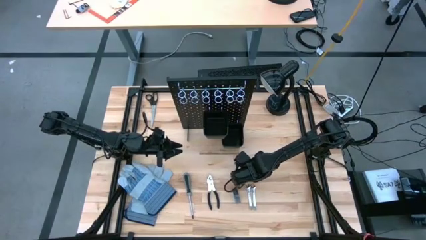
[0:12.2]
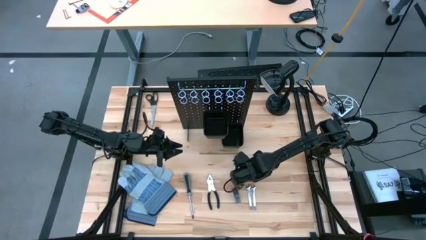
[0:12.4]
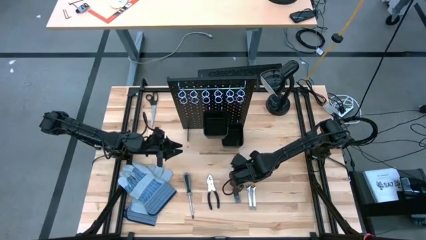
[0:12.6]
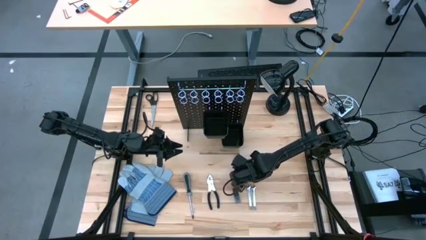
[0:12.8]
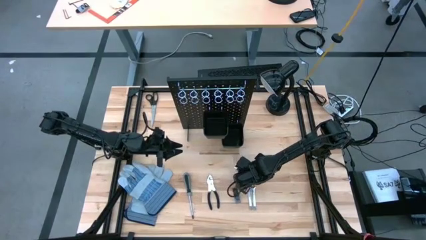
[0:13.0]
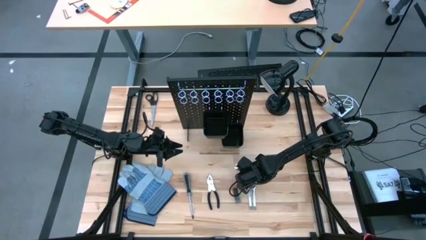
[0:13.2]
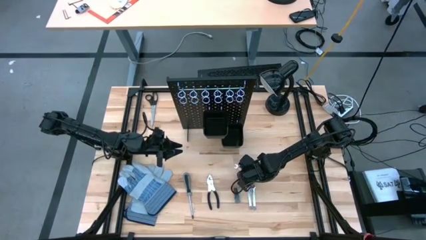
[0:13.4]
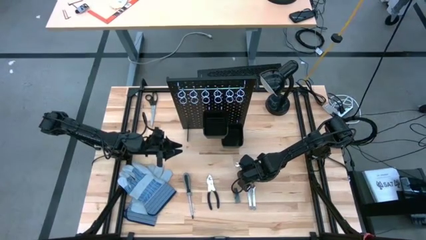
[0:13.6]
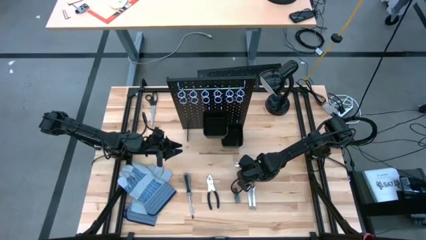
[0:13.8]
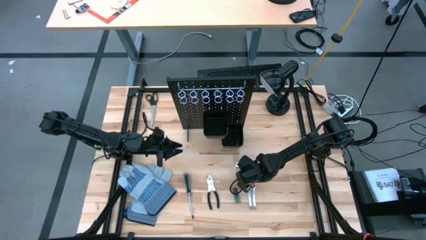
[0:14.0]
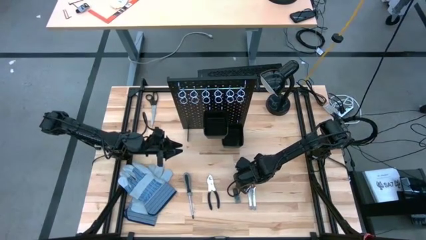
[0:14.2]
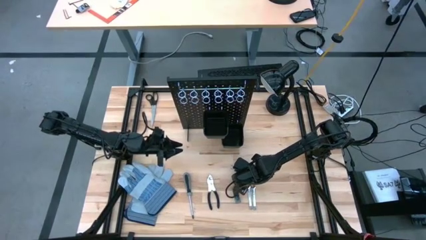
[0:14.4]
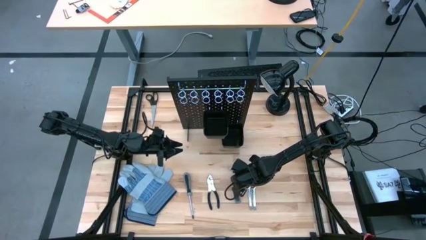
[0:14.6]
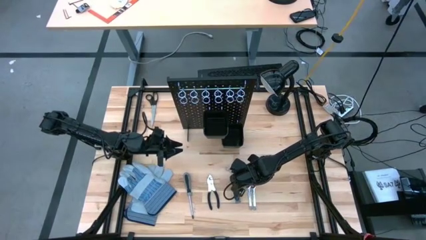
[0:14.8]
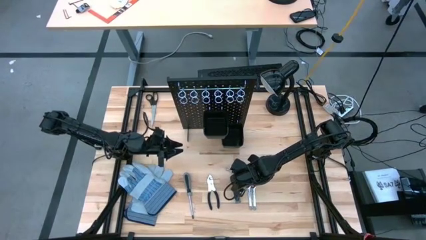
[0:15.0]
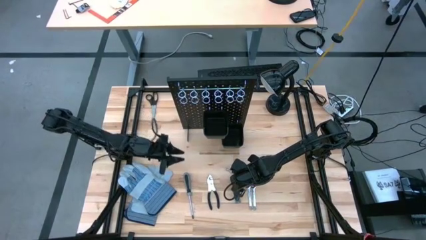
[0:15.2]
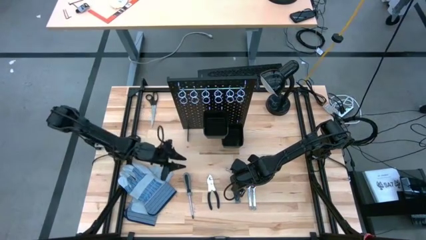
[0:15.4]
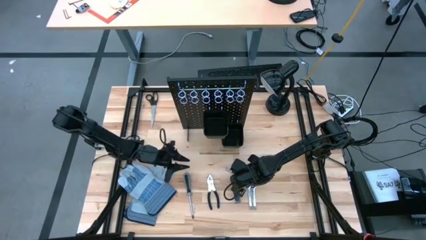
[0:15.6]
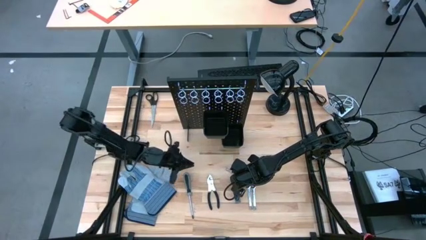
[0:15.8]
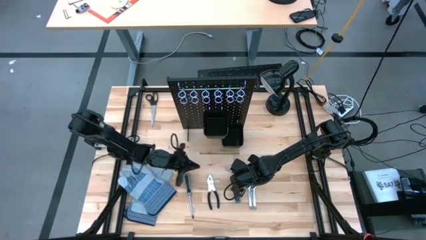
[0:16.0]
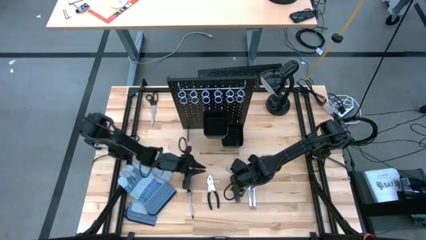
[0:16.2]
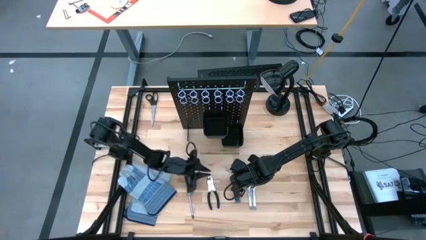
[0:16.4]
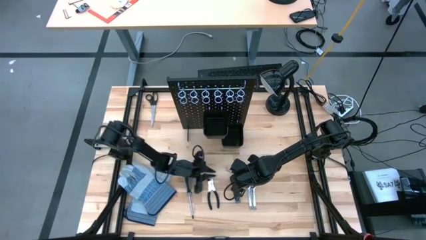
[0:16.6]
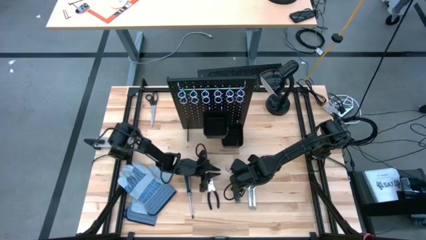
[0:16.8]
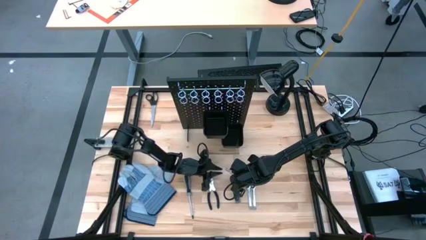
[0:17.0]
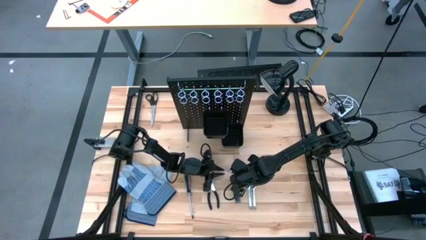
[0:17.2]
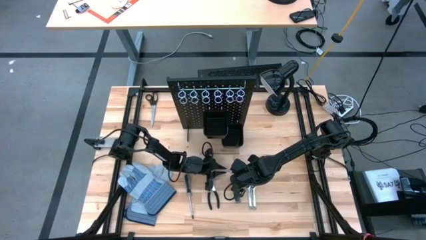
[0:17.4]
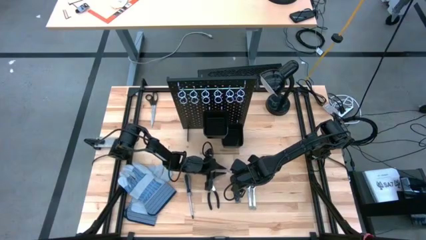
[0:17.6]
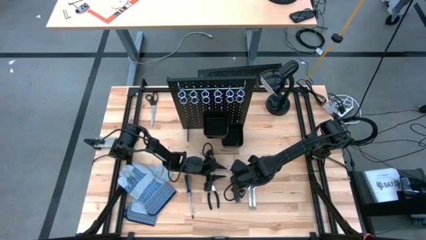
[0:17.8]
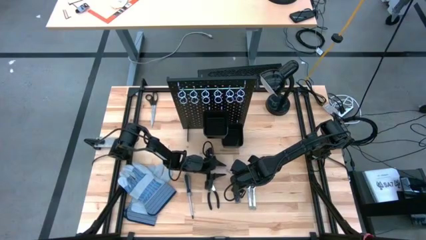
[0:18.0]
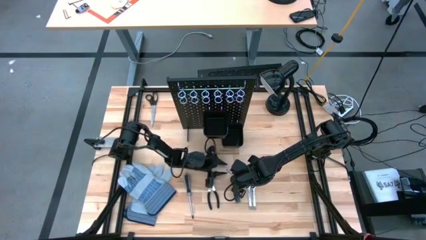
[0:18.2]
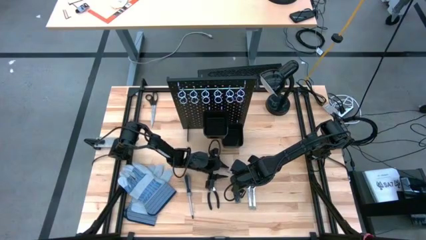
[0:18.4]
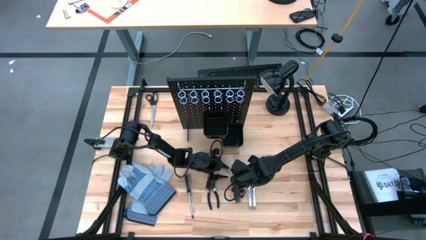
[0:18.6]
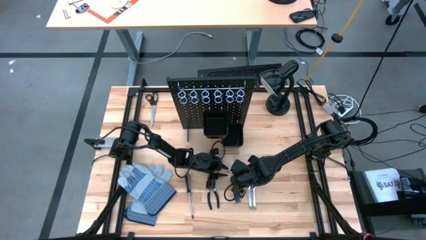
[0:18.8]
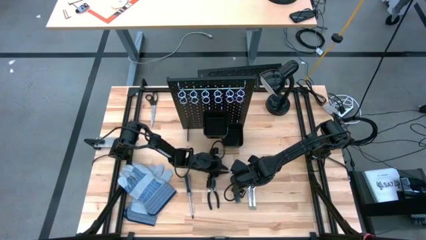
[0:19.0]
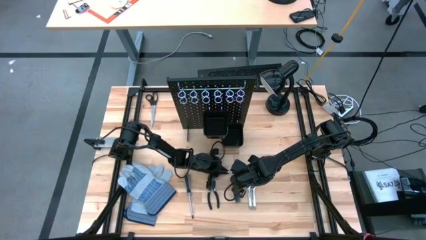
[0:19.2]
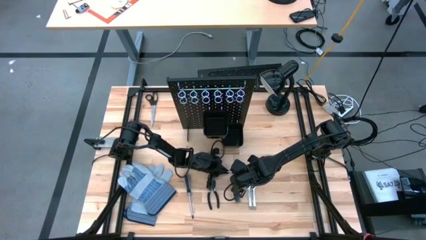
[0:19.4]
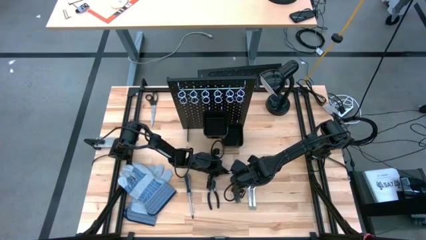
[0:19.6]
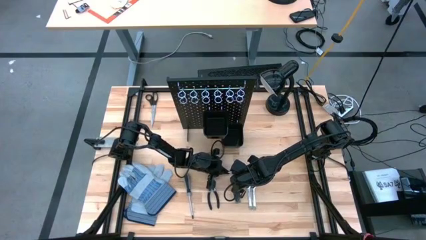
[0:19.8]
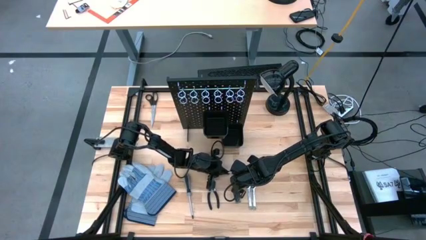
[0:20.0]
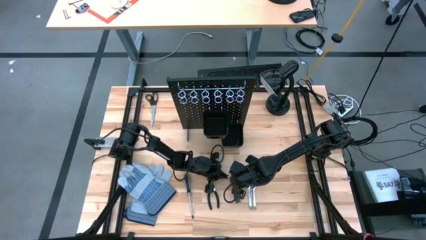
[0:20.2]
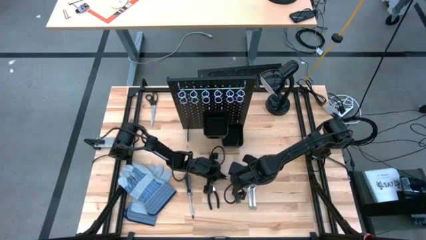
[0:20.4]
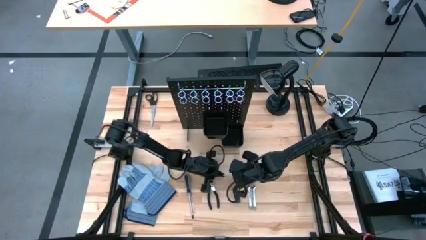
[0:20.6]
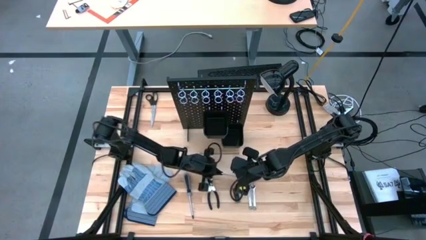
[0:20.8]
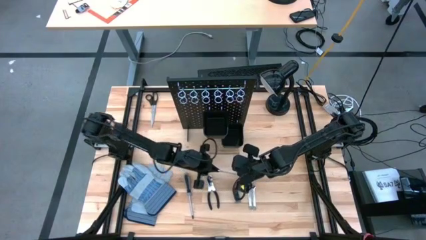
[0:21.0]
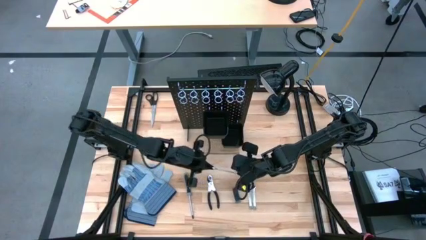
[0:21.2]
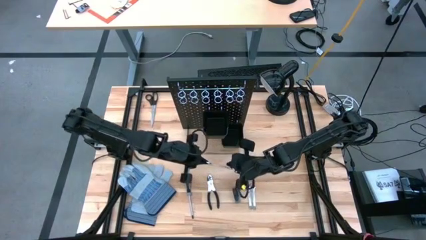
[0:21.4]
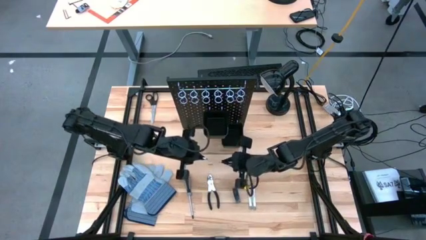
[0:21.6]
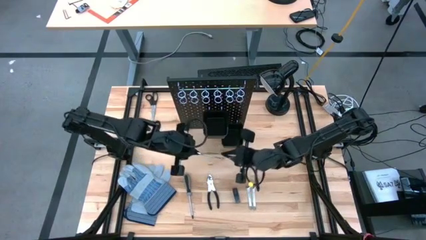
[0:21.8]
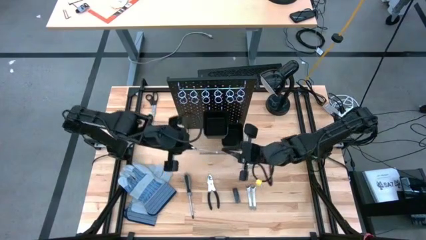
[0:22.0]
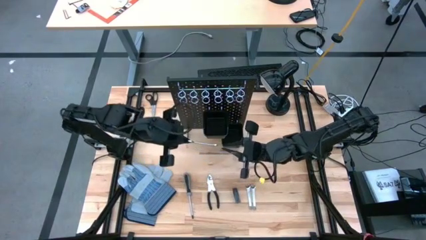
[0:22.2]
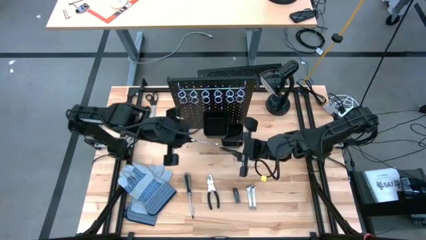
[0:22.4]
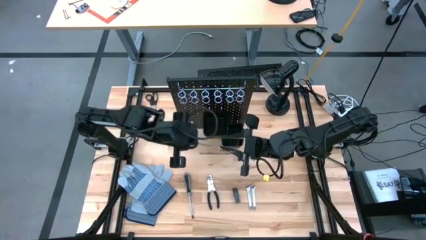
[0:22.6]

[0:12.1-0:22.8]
Task: Hang tools onto peg board
Hang the right silver wrench on the black pegboard

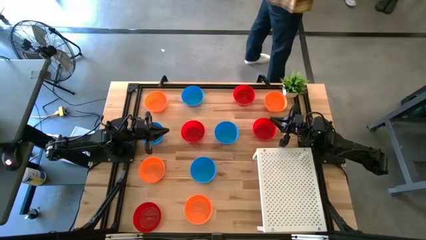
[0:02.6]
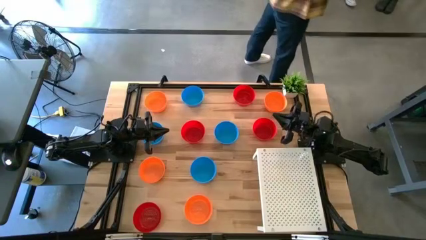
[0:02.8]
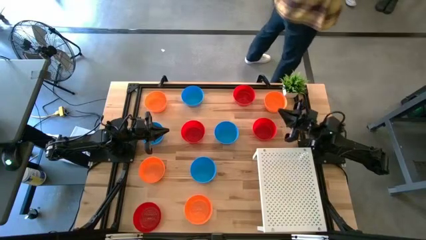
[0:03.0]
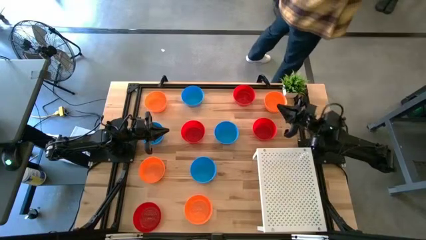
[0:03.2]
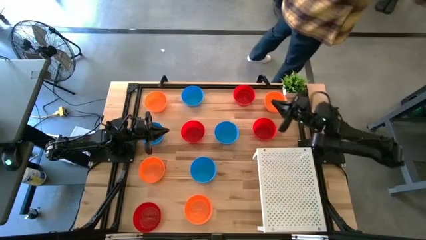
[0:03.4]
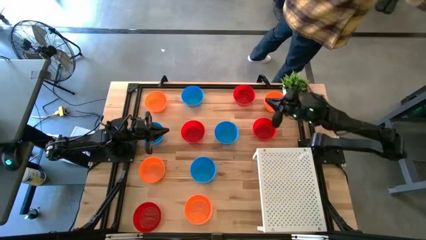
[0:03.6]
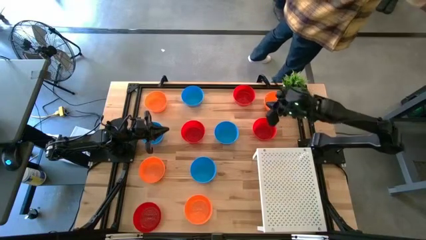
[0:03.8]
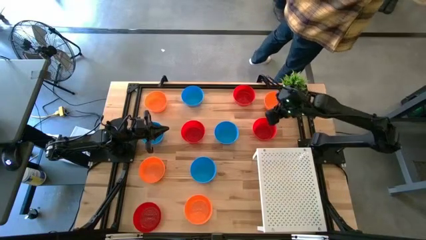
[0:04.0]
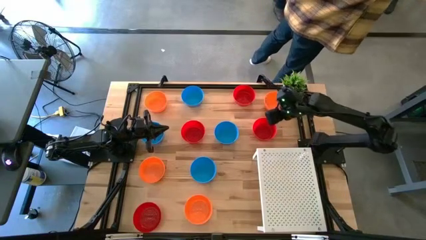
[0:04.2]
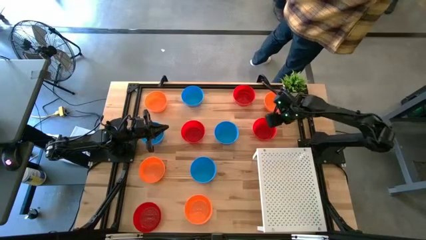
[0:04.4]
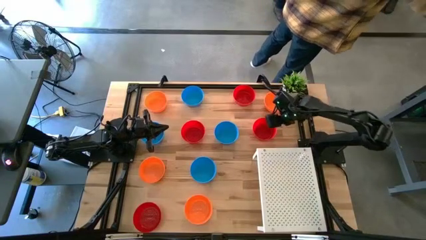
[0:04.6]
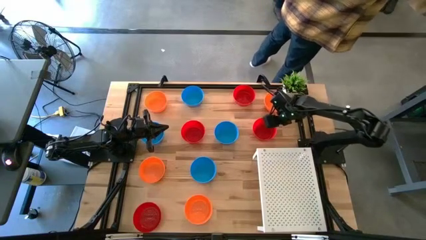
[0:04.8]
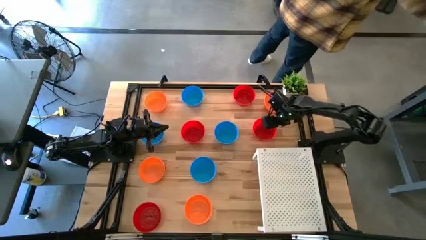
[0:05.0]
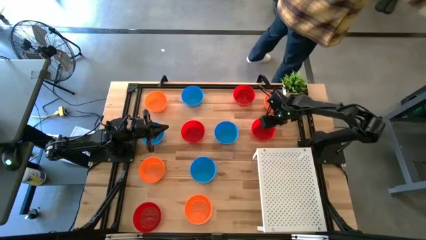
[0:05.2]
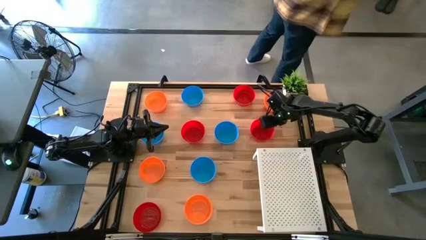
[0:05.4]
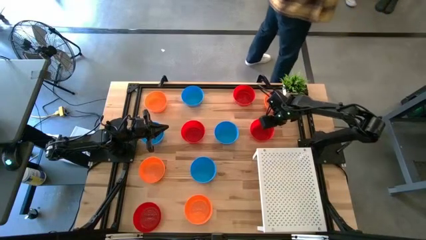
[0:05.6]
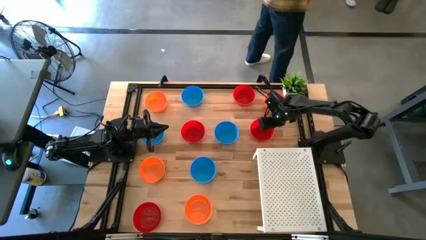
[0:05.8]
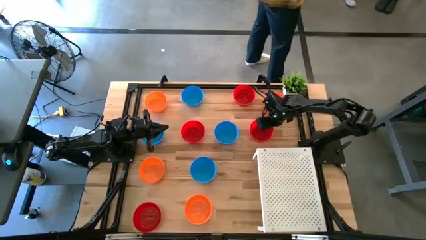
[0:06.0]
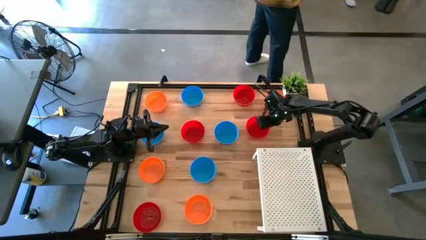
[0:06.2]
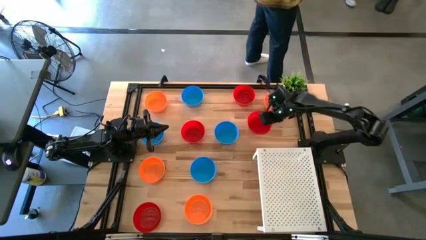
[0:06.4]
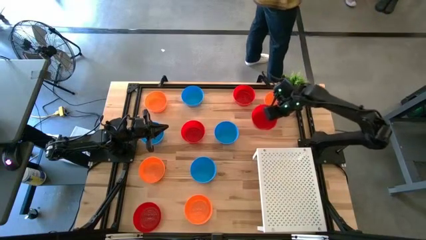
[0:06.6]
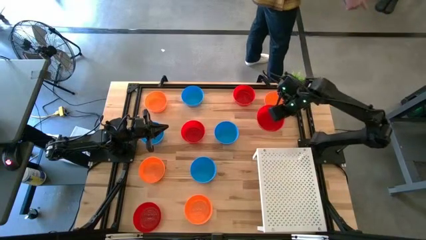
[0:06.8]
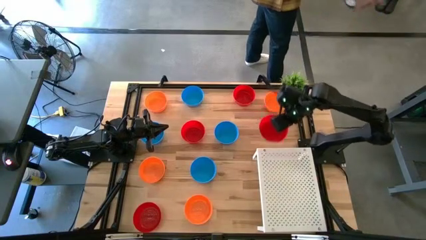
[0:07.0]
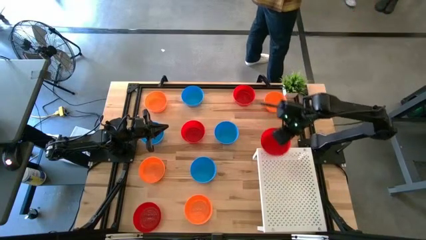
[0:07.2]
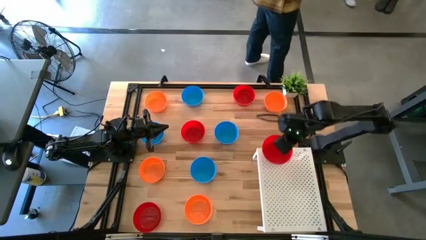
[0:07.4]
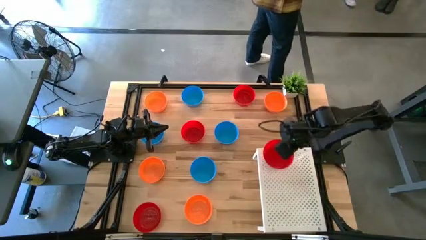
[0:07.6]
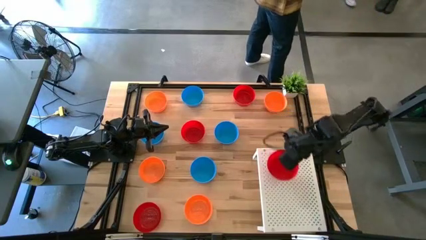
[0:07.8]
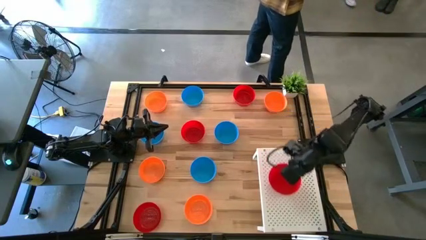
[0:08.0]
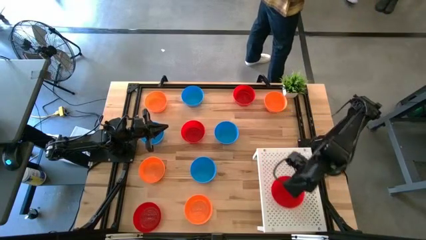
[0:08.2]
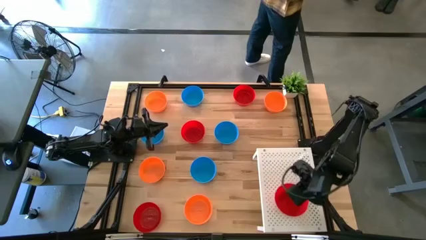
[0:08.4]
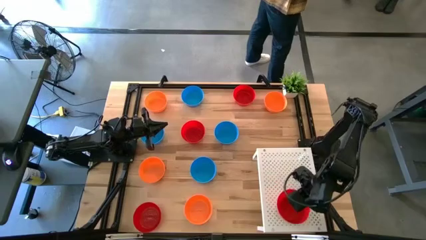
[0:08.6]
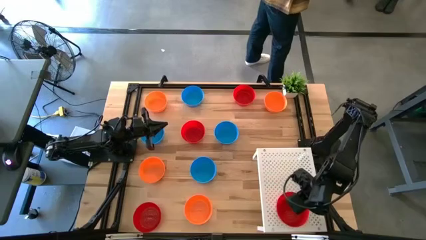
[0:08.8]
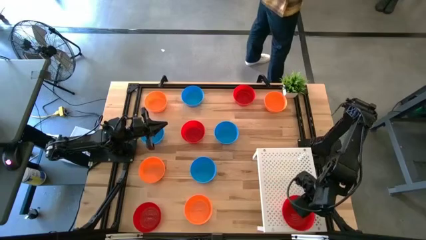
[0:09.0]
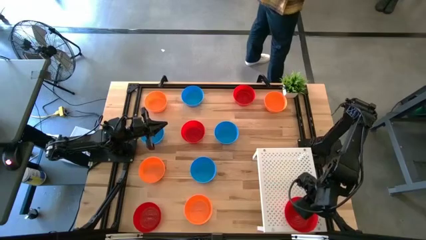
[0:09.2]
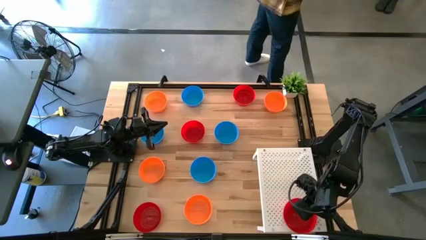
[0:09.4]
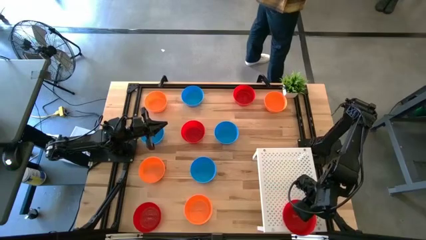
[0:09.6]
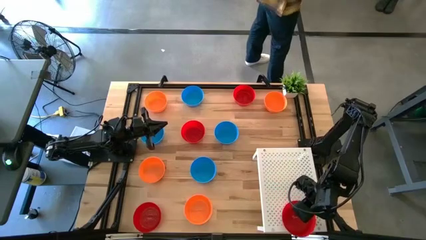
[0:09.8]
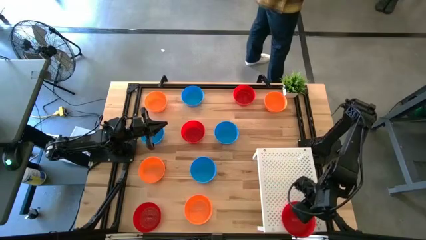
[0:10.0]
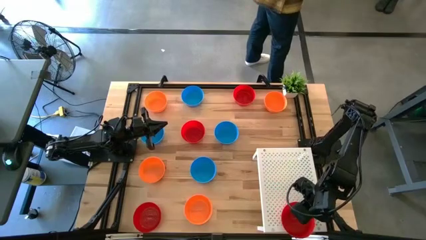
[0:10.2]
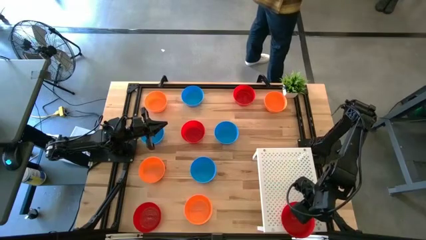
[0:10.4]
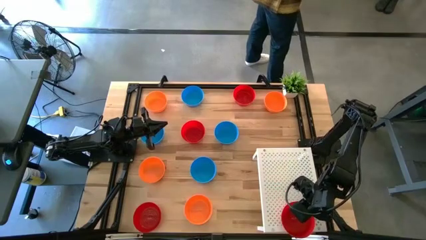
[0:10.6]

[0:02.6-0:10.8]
Task: Pick & Place Mini bowls
Put the red bowl on the shelf
